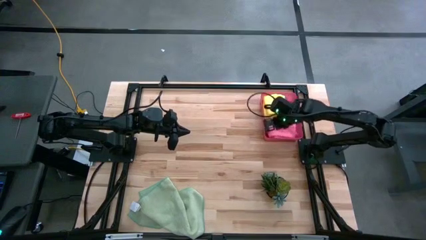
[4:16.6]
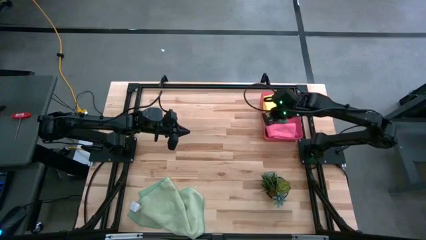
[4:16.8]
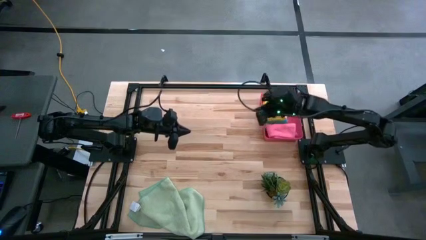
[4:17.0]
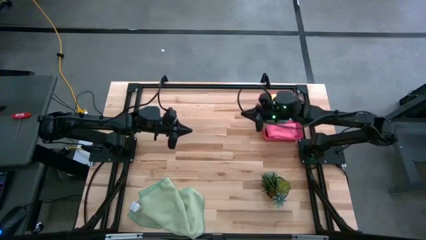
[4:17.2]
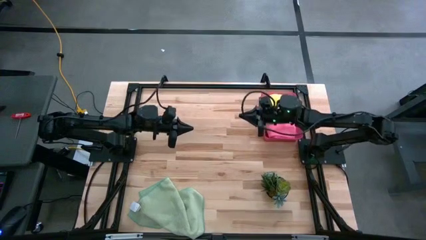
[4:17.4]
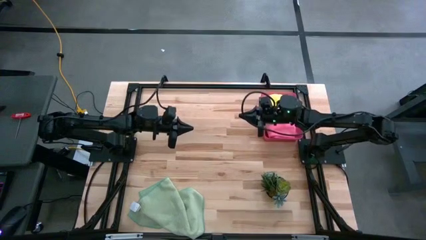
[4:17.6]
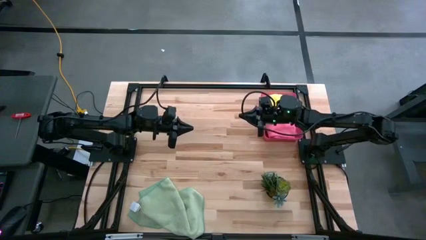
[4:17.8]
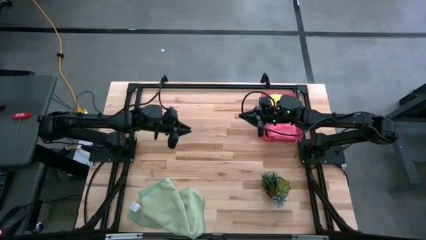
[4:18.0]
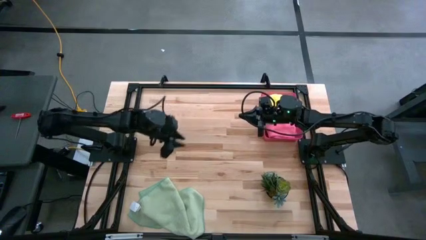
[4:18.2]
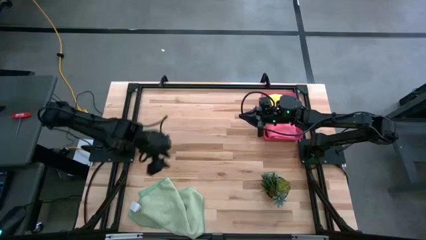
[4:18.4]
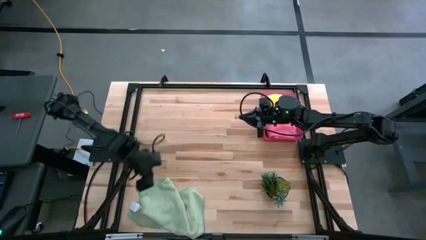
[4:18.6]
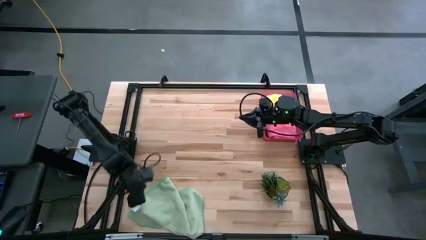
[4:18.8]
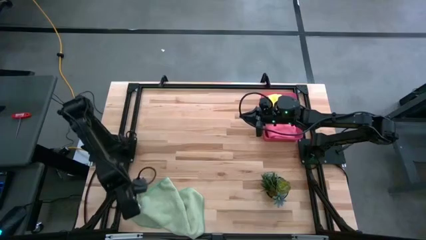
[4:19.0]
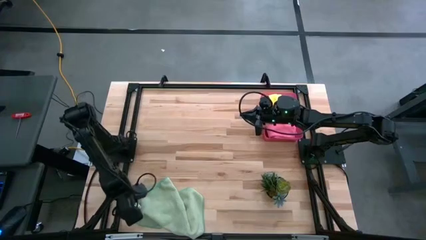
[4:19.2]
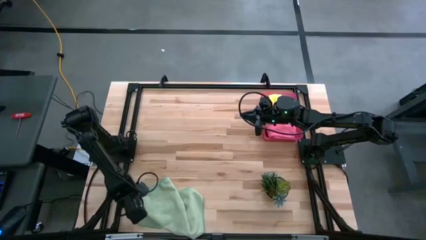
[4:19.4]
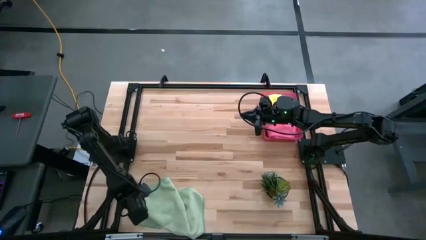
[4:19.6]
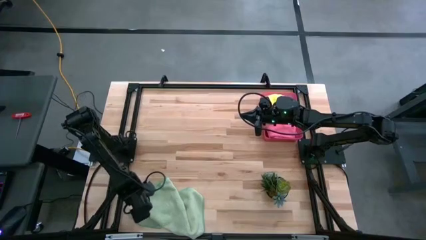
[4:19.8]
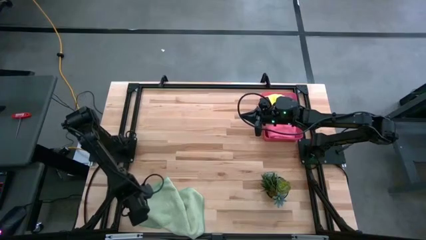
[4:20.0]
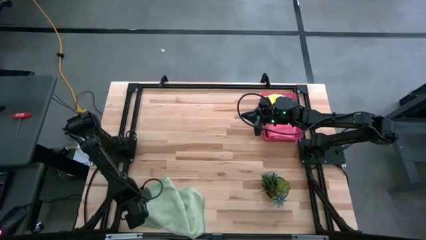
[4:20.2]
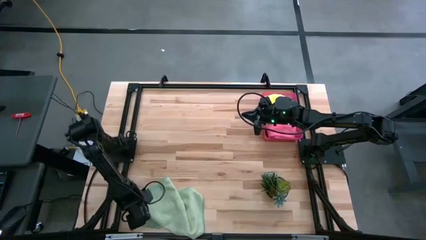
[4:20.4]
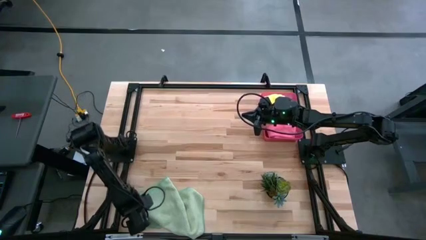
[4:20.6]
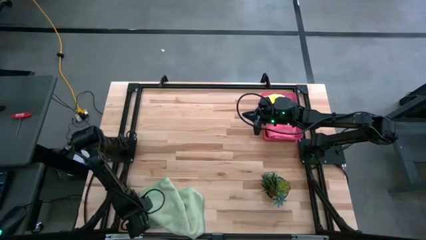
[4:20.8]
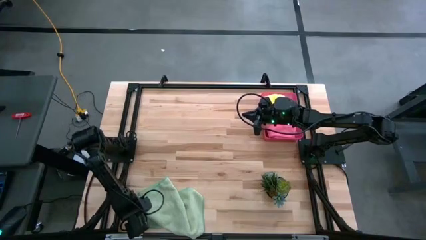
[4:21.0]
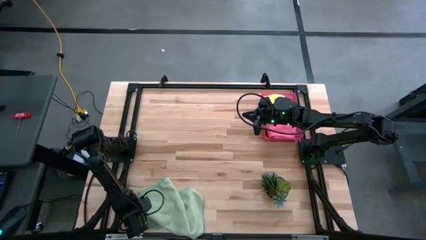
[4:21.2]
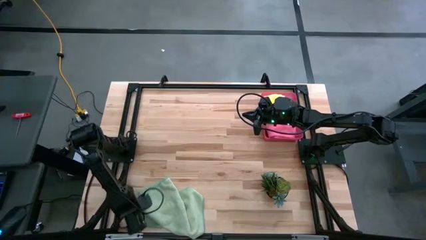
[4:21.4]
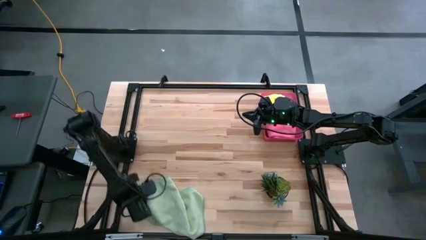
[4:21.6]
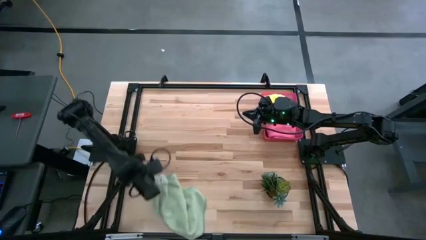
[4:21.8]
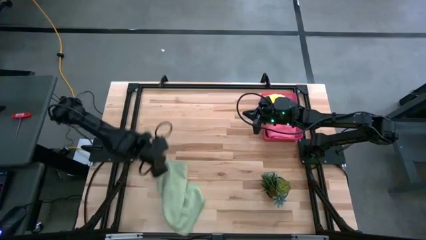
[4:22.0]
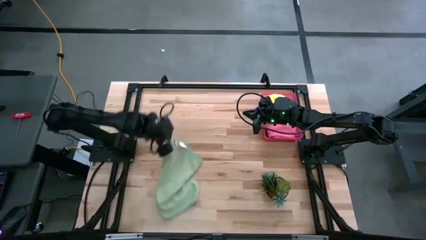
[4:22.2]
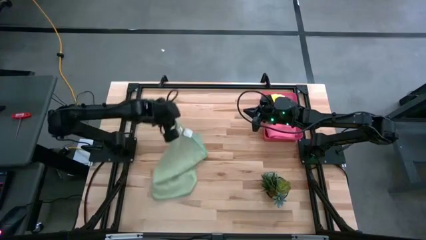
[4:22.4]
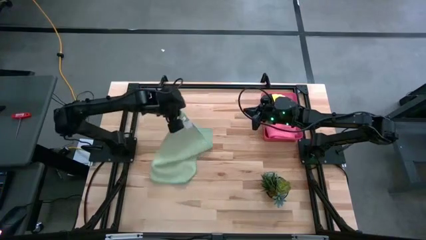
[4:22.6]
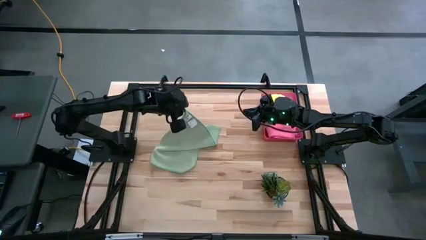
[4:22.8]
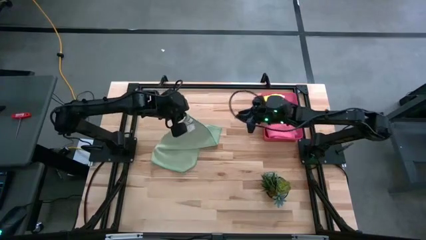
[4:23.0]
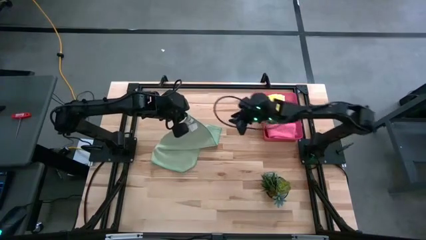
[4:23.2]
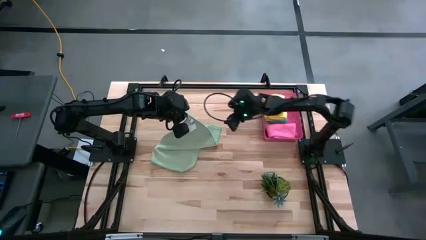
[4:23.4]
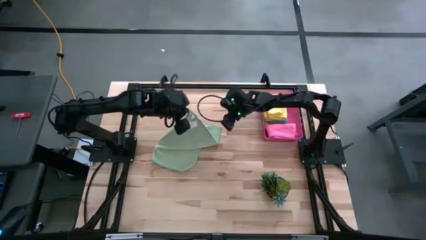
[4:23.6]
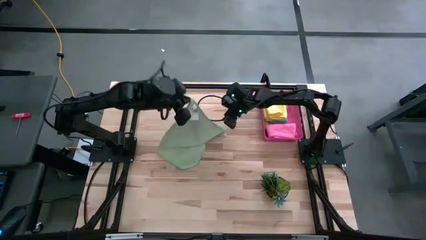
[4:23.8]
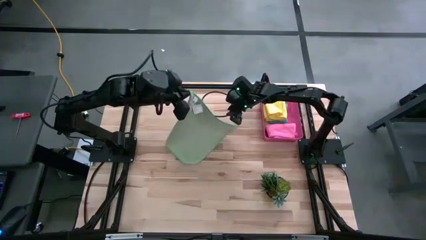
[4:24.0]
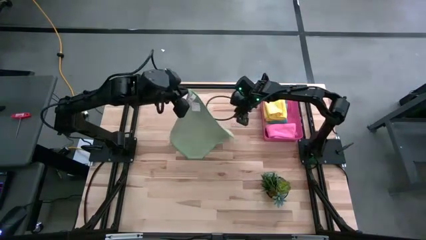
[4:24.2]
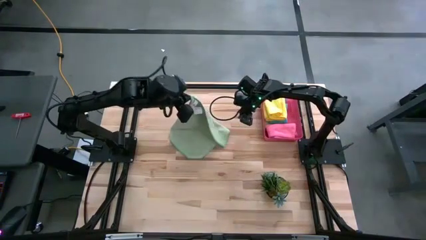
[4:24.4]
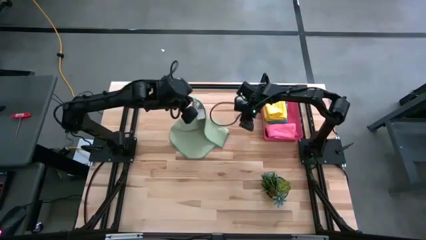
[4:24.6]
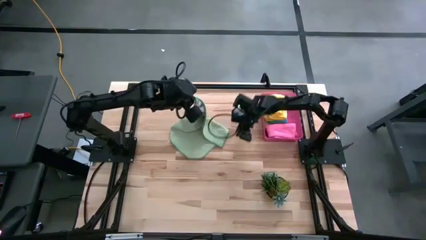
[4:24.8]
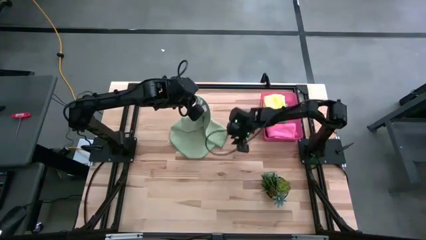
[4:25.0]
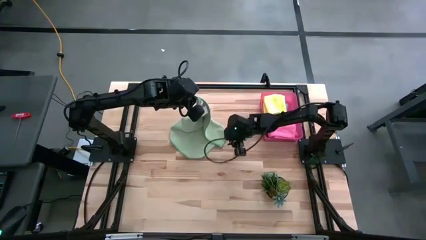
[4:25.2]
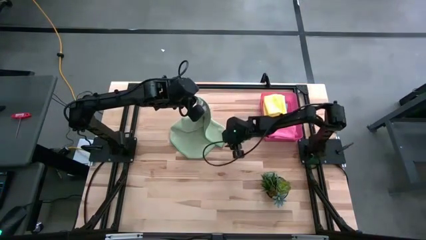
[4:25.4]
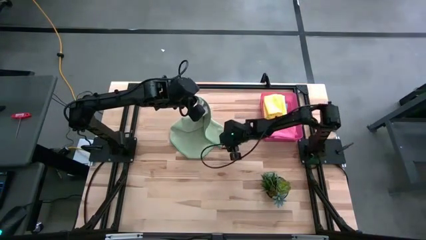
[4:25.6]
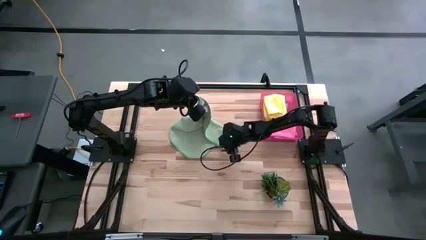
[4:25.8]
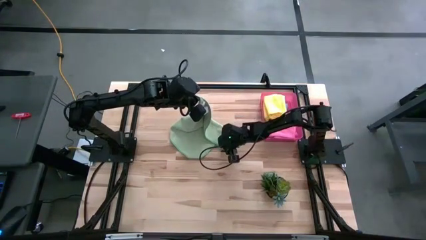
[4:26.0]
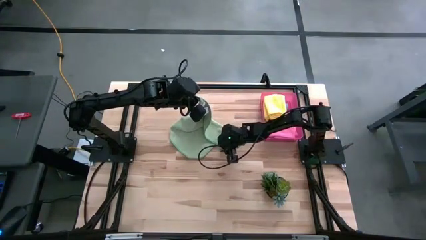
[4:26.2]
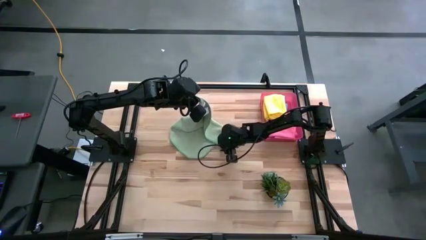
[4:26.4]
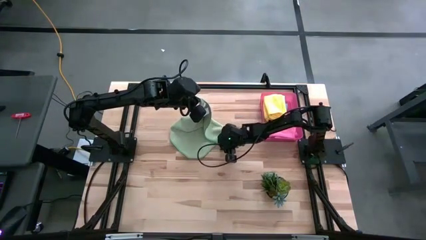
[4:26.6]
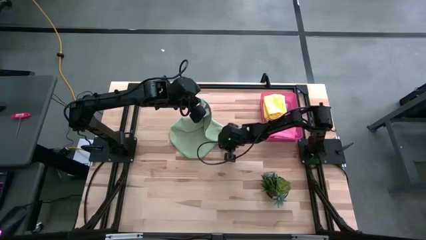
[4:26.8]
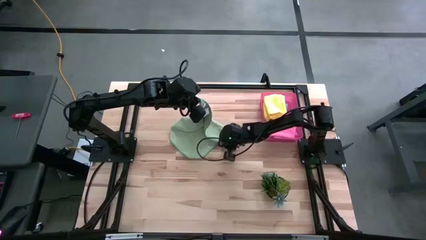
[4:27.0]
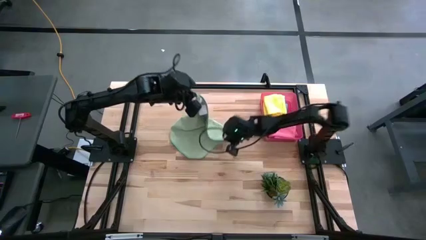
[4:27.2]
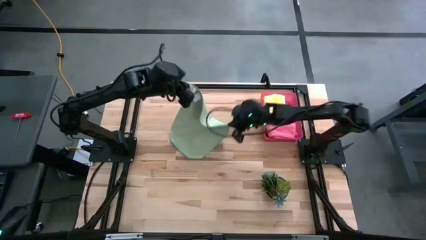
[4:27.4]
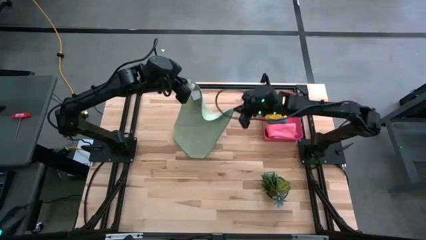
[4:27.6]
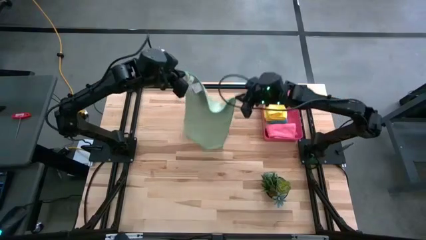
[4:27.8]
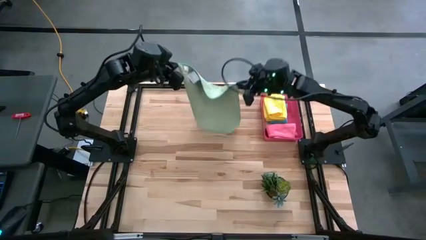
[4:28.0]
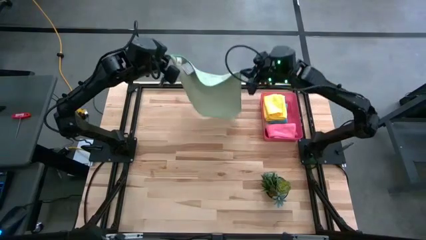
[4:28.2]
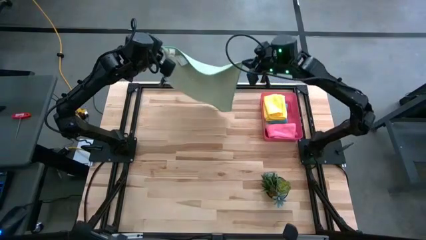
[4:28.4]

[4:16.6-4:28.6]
Task: Fold microfiber towels
Fold the light green microfiber cloth

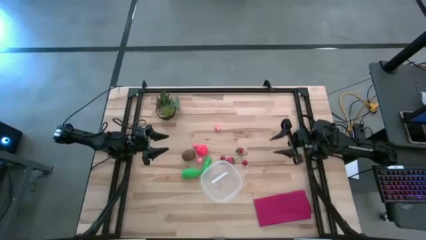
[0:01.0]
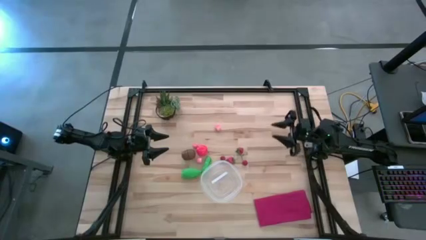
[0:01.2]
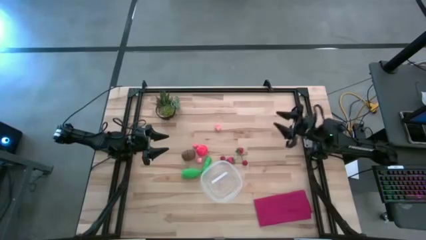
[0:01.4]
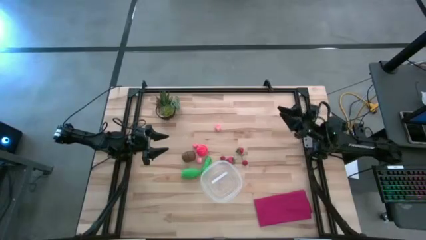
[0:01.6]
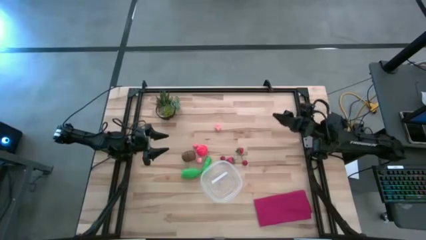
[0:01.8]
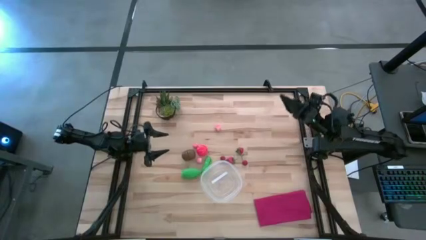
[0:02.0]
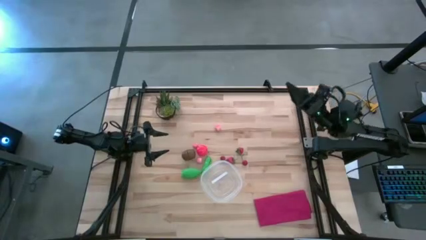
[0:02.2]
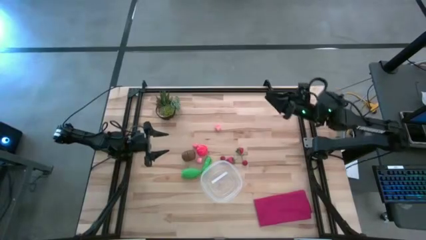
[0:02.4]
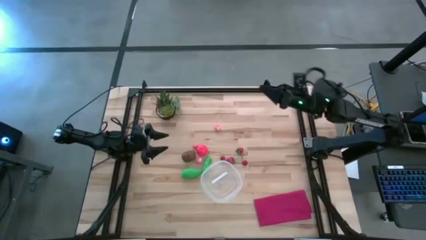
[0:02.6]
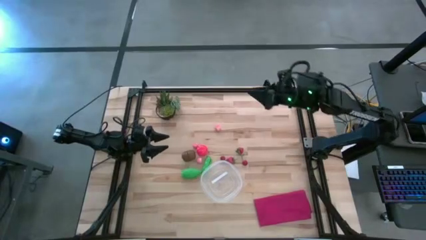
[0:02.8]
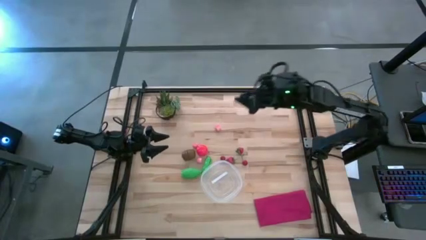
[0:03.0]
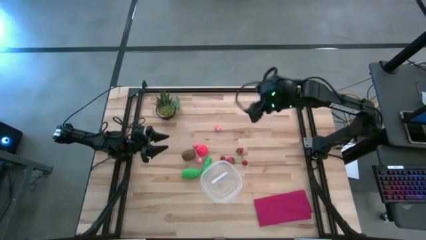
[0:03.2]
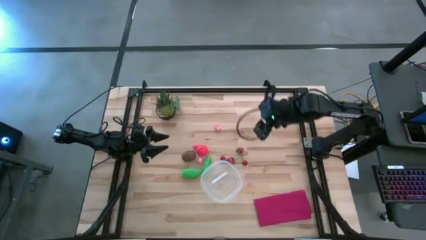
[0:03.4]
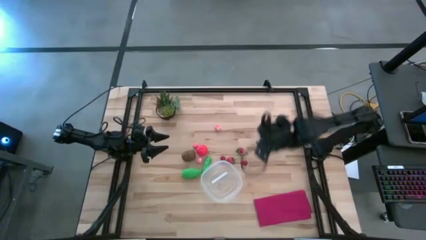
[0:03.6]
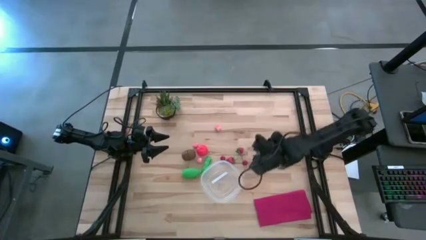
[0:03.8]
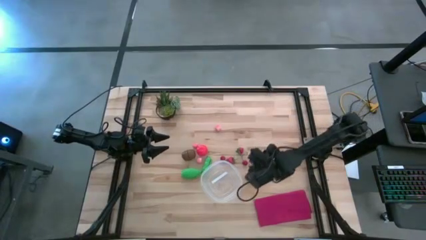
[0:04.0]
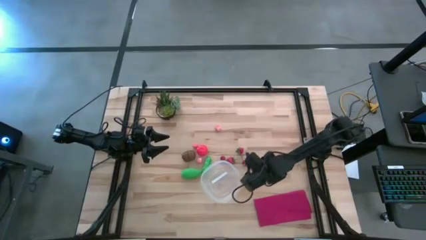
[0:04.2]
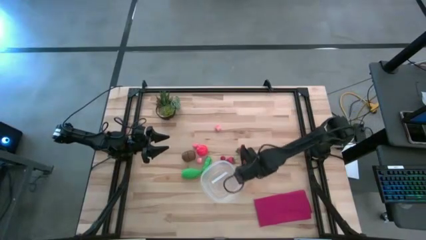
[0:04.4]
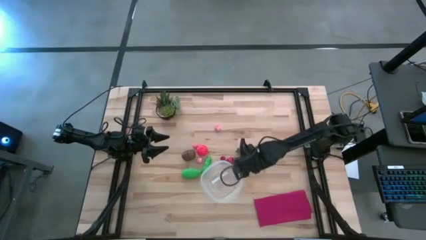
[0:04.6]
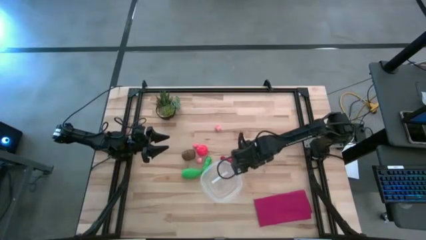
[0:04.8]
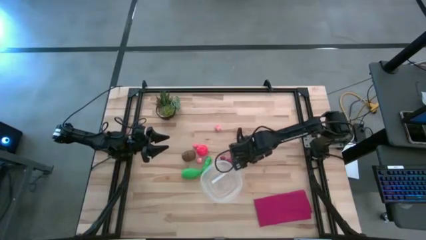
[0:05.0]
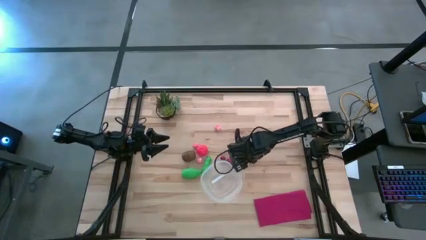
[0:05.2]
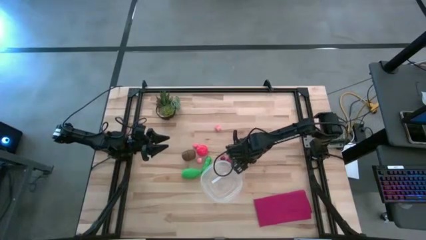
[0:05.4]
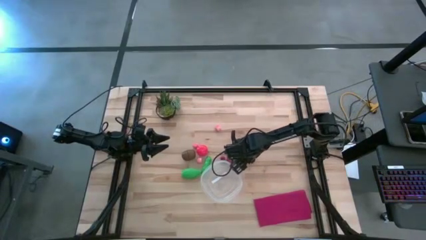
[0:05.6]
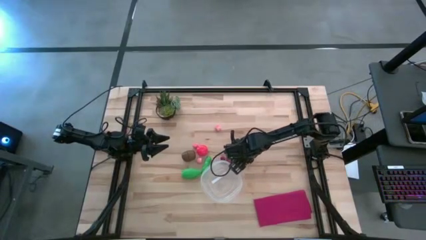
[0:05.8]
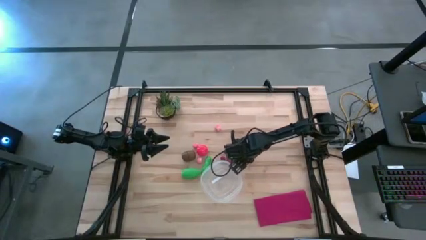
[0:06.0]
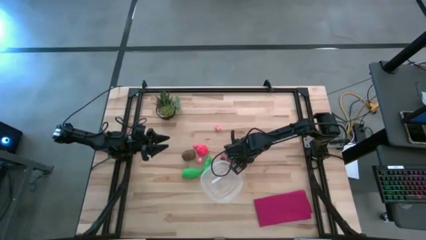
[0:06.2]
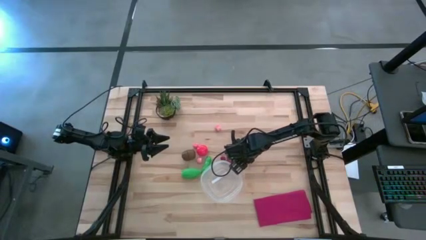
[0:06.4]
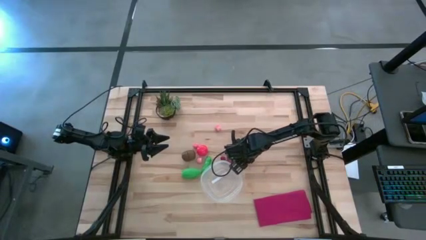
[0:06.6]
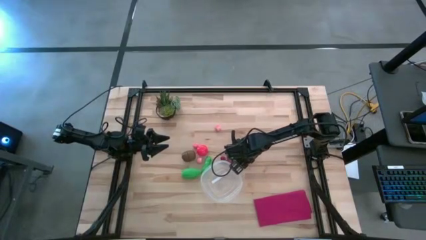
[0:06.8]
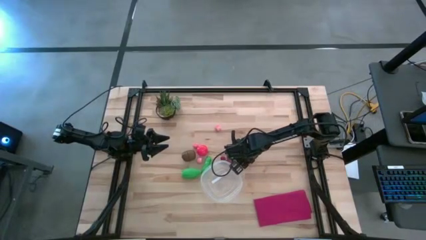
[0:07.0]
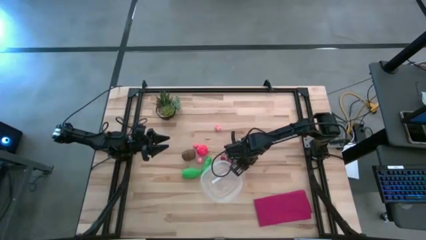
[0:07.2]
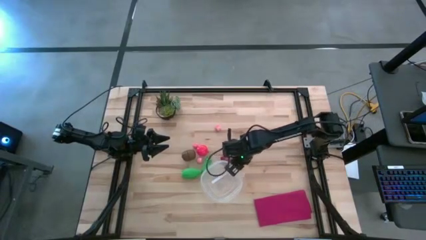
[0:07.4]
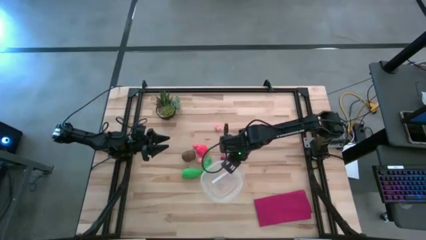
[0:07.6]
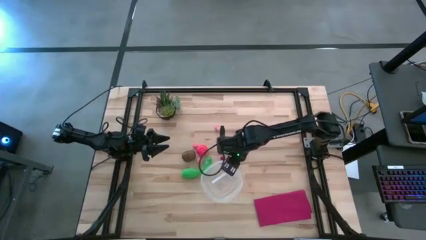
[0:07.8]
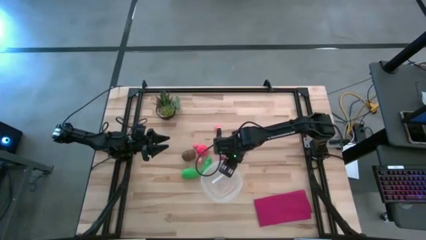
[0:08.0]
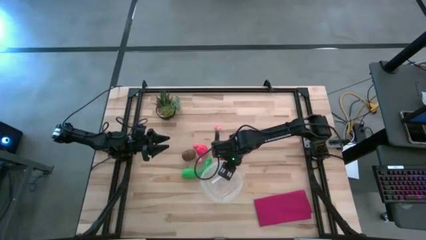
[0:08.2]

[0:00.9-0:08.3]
Task: Pick and placing Produce into tupperware
Put the right red cherry into the transparent bin
